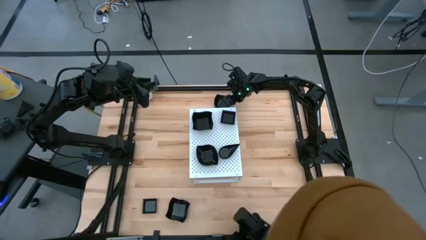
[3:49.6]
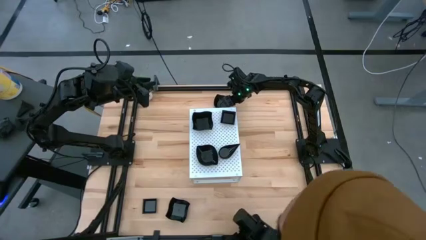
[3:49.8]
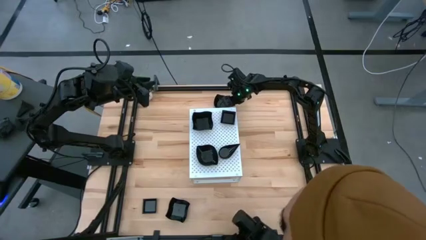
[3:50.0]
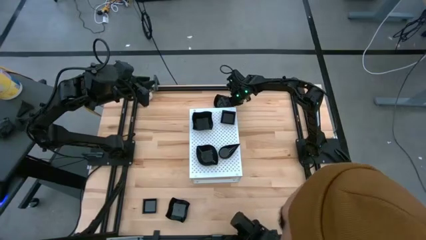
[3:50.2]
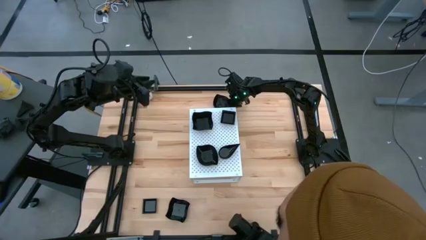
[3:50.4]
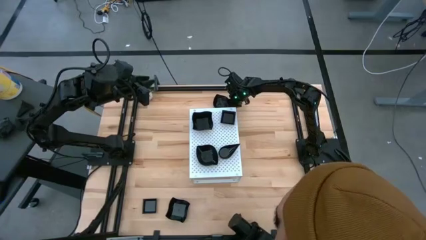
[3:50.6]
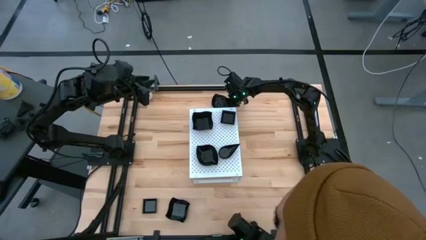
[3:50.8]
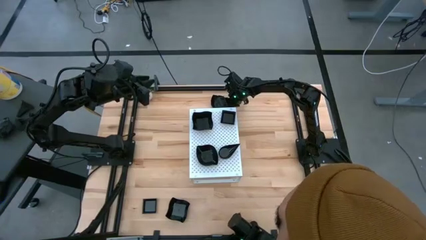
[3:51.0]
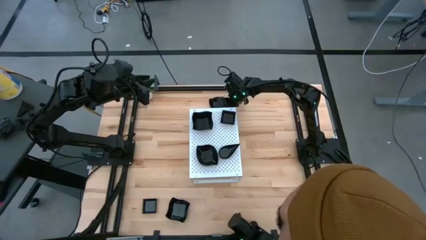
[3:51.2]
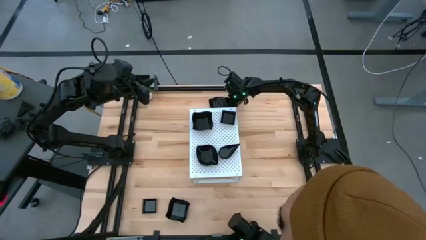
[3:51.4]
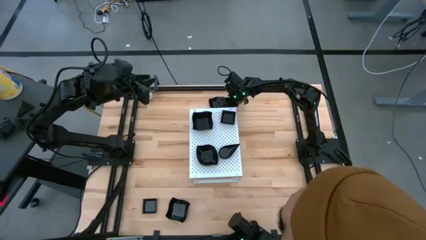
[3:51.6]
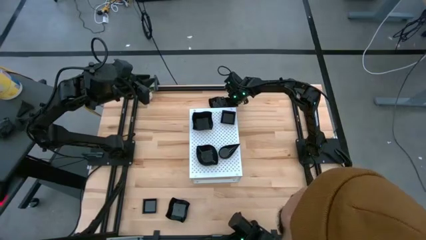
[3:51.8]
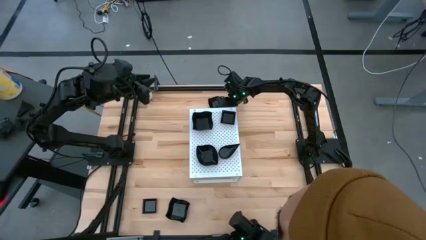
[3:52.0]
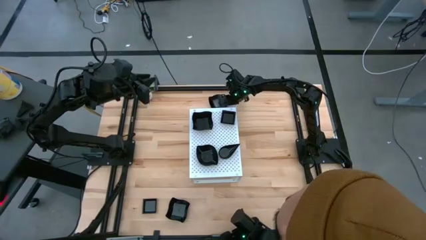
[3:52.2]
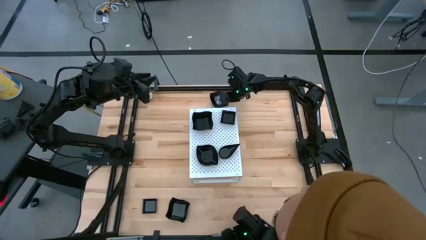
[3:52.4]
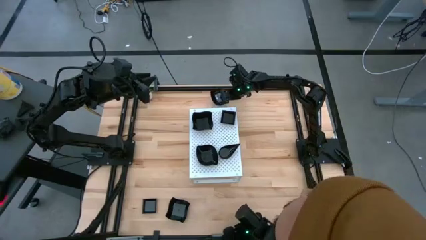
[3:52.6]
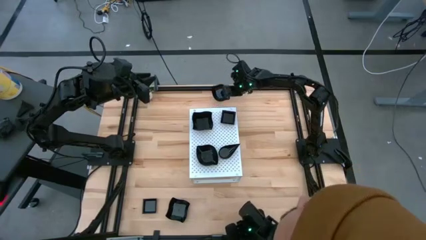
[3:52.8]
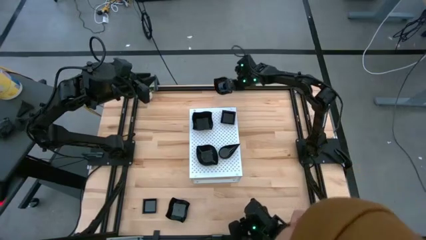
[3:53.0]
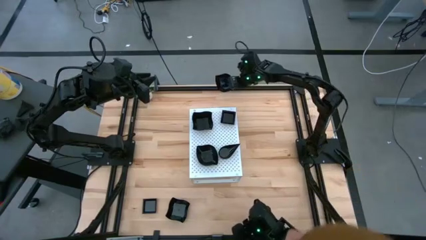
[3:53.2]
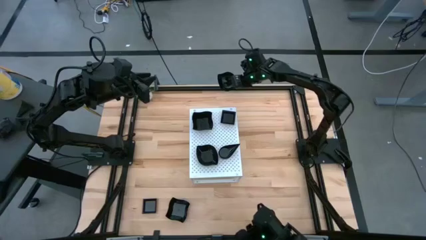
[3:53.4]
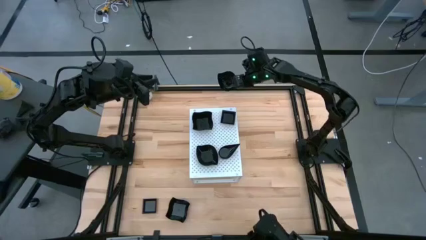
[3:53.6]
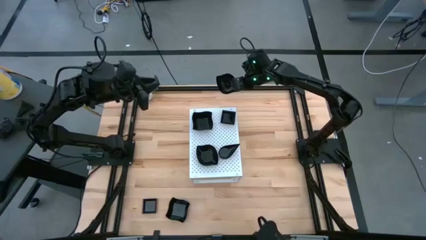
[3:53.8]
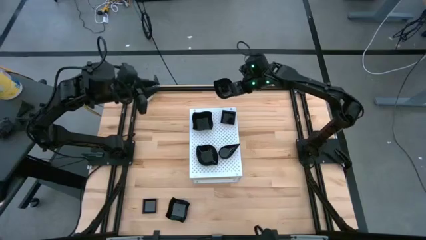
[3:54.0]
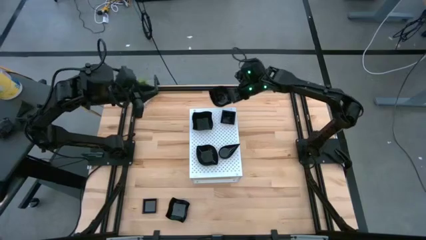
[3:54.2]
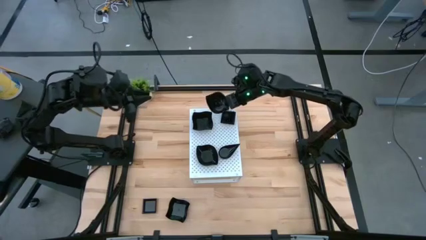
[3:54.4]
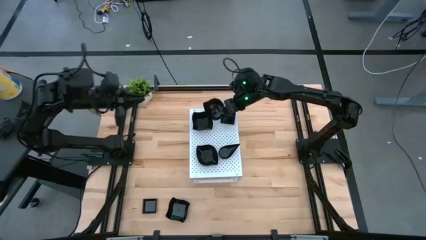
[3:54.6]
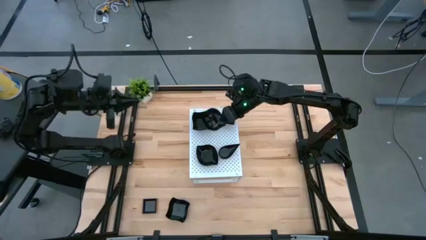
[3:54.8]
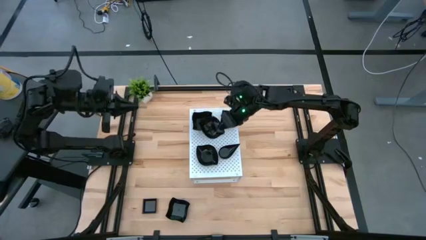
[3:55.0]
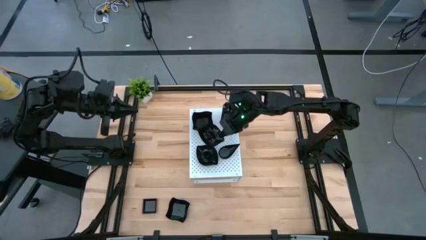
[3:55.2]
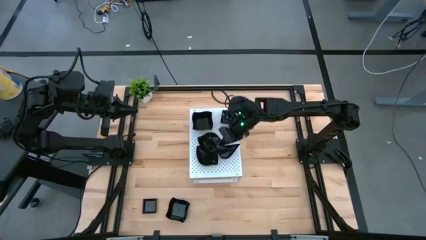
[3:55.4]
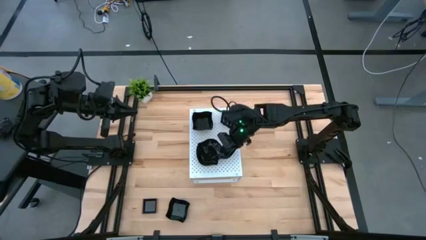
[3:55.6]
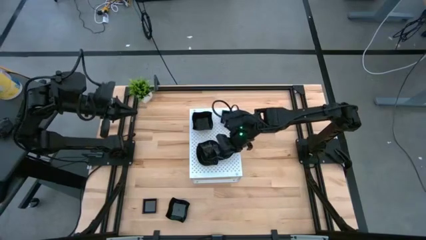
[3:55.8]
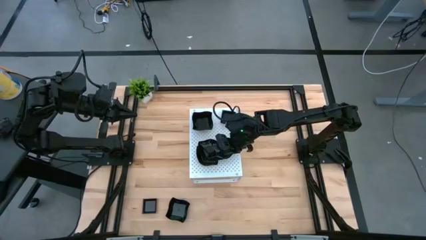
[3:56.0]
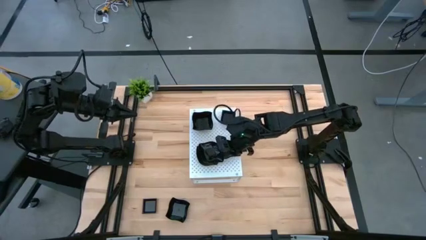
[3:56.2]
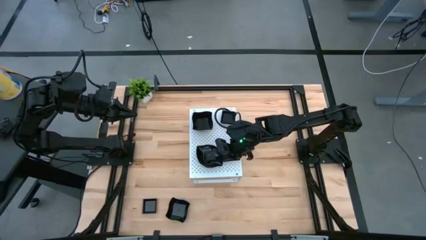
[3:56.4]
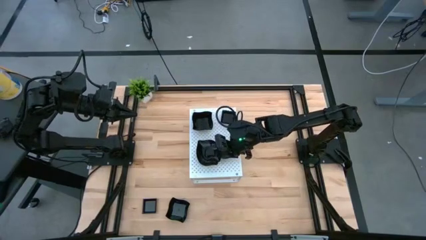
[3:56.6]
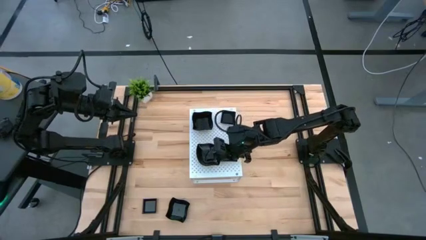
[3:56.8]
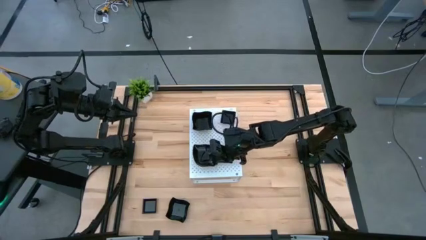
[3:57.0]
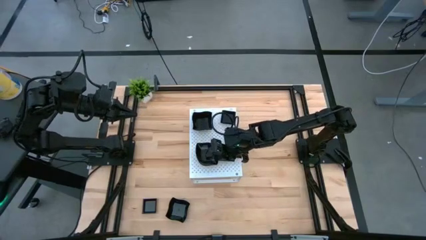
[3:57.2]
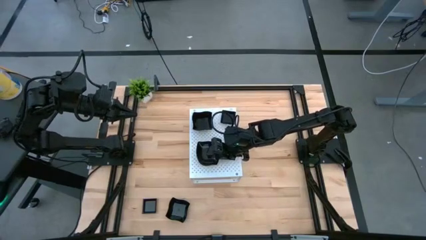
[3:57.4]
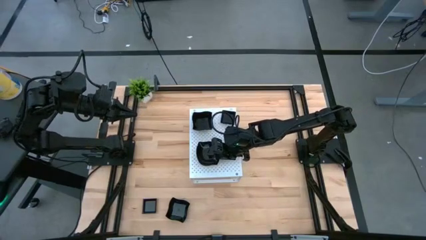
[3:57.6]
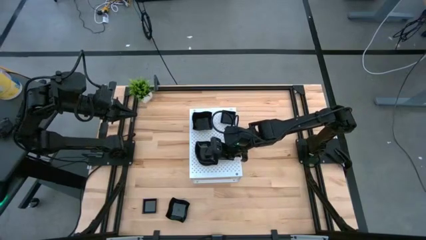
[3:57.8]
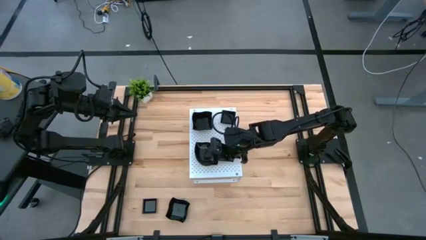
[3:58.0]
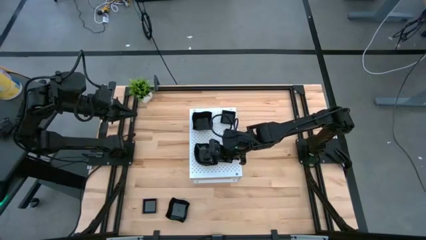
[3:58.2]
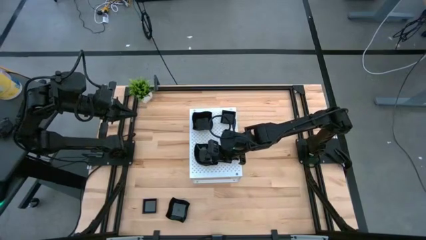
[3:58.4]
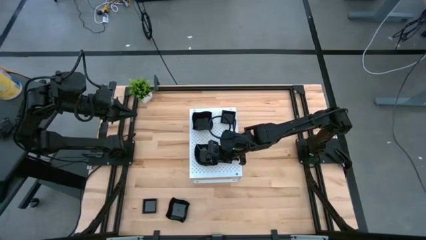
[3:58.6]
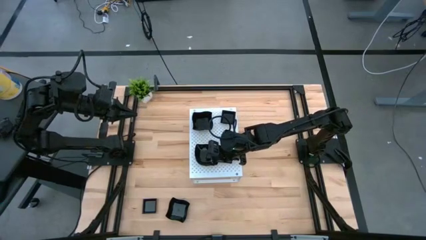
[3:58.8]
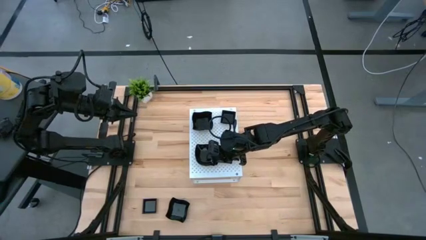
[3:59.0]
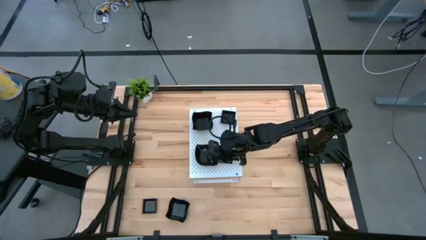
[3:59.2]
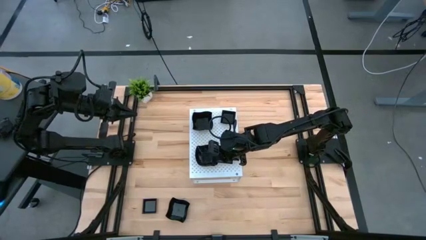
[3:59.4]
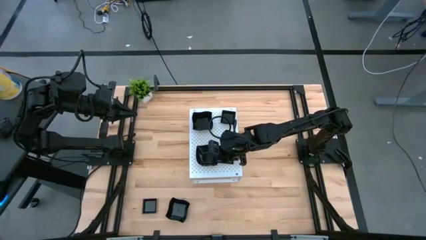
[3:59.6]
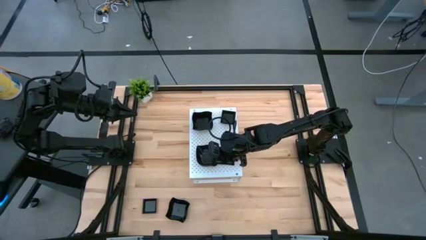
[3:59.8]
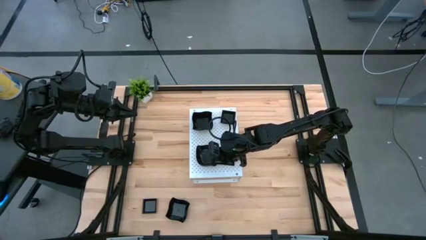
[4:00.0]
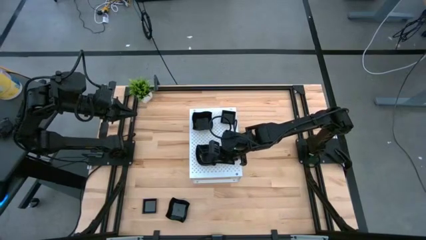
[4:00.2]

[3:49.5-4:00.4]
Task: Pick & Place Mini shaped plates
Stack the black leaf shaped plate on top of the other black leaf shaped plate on the shelf
